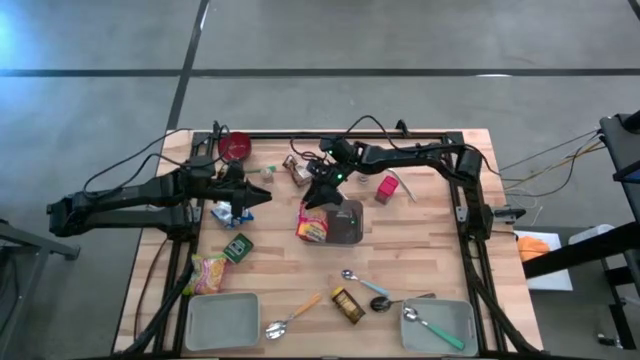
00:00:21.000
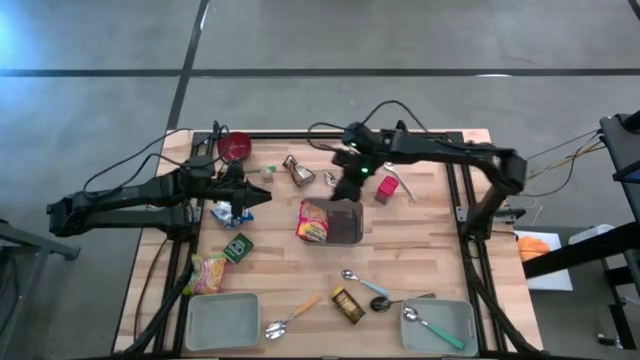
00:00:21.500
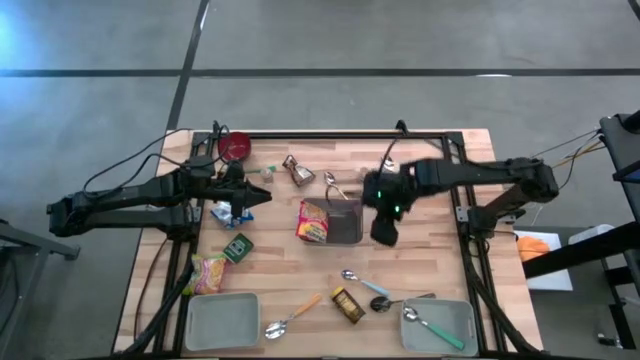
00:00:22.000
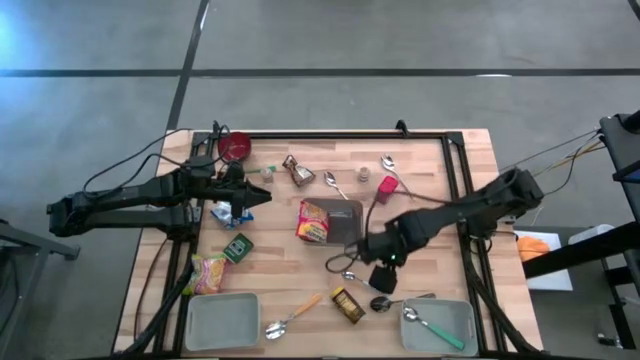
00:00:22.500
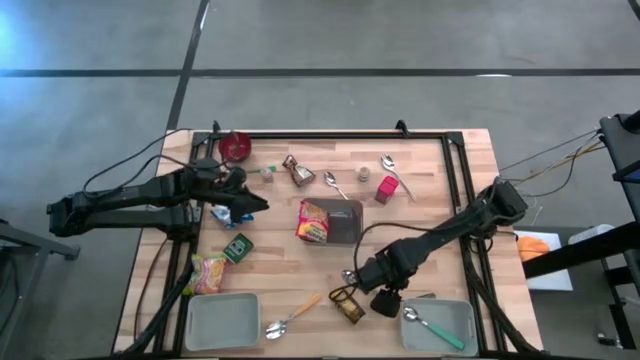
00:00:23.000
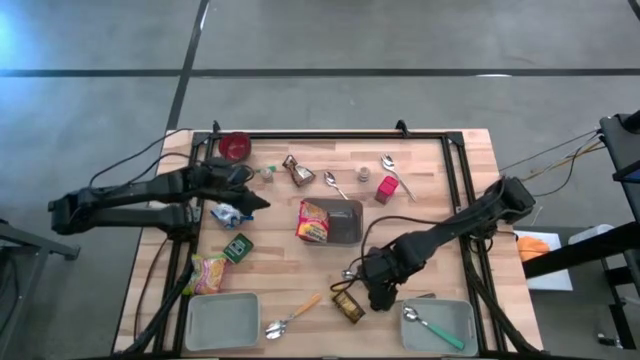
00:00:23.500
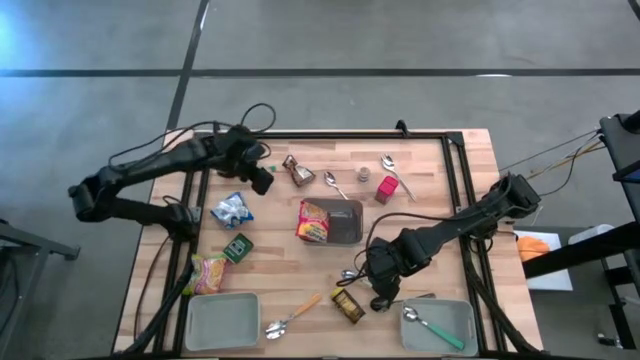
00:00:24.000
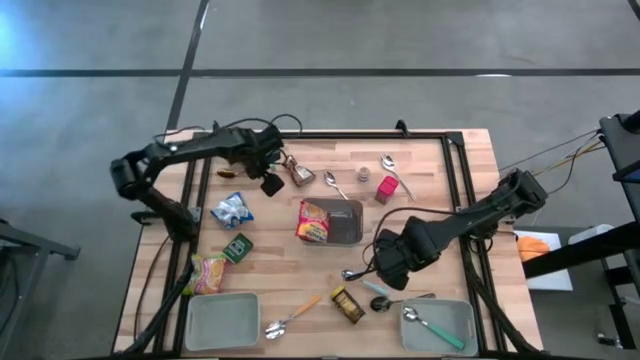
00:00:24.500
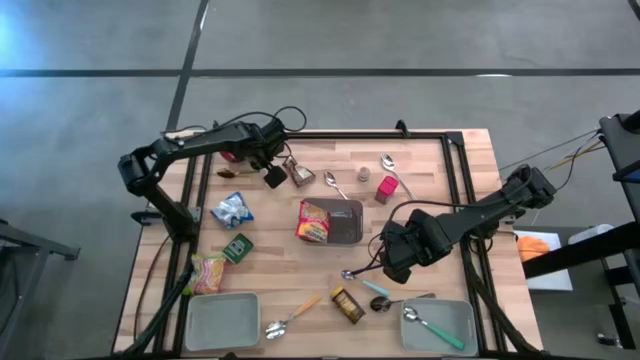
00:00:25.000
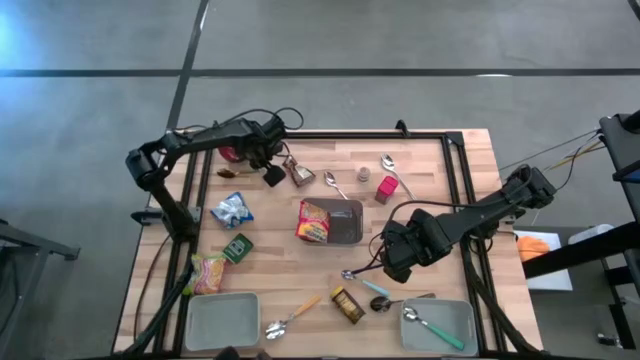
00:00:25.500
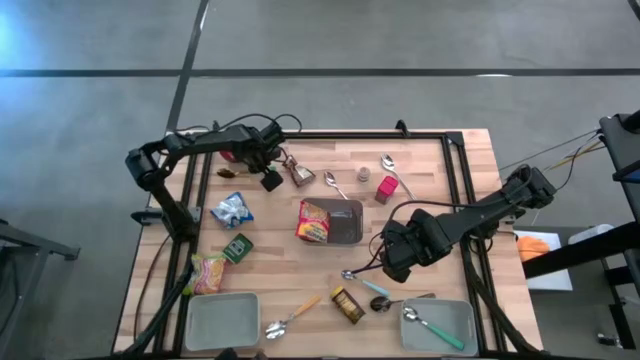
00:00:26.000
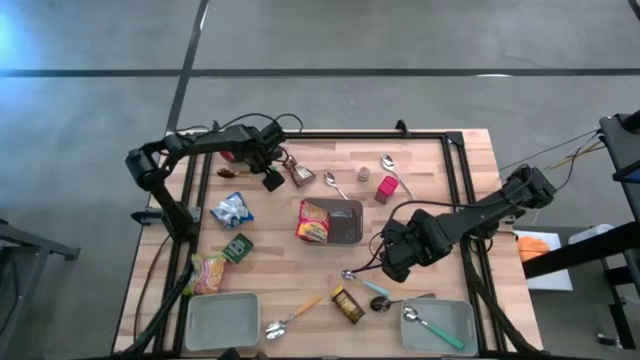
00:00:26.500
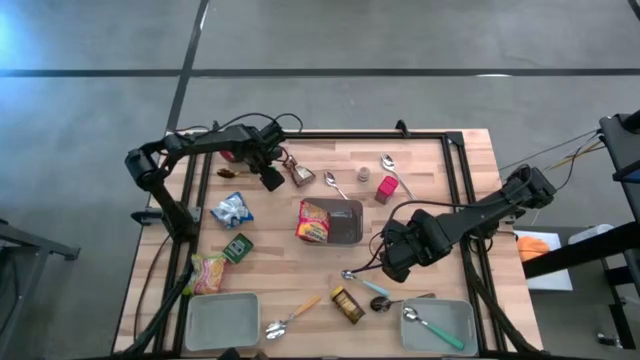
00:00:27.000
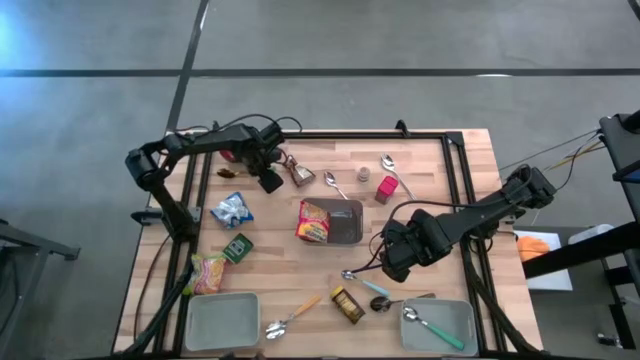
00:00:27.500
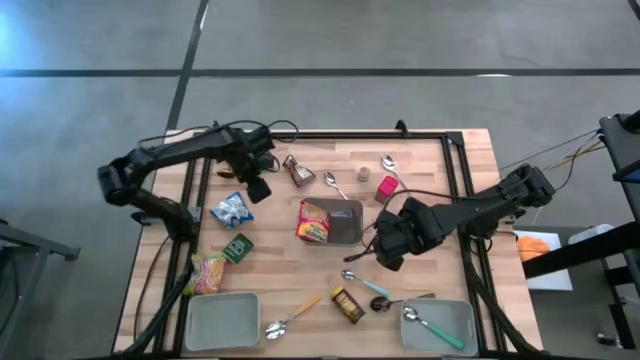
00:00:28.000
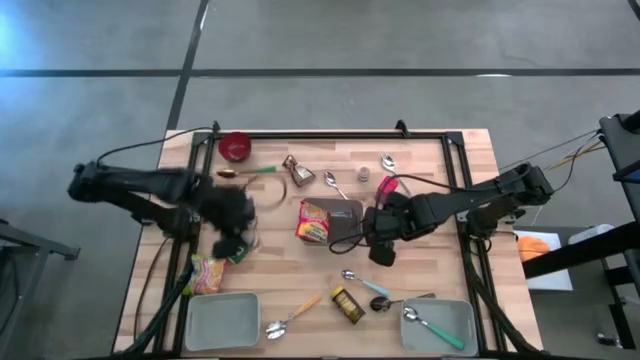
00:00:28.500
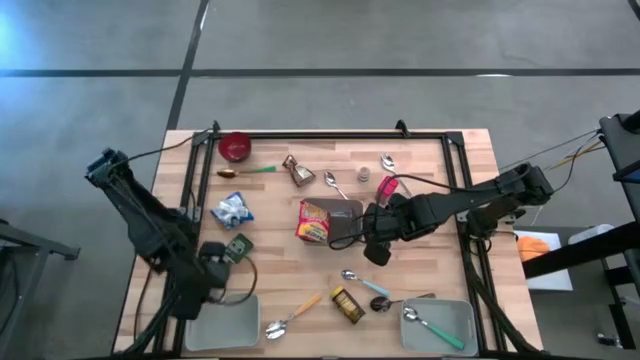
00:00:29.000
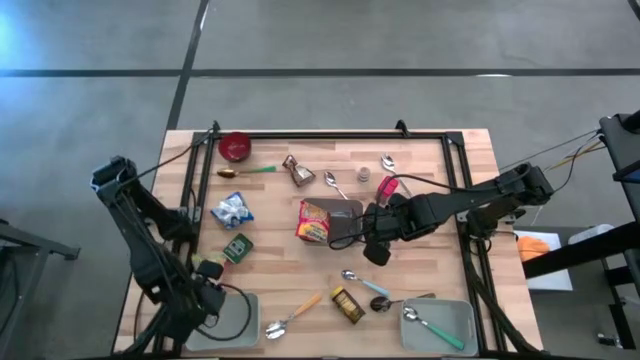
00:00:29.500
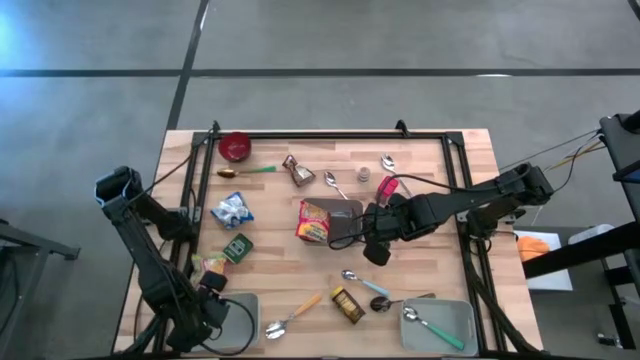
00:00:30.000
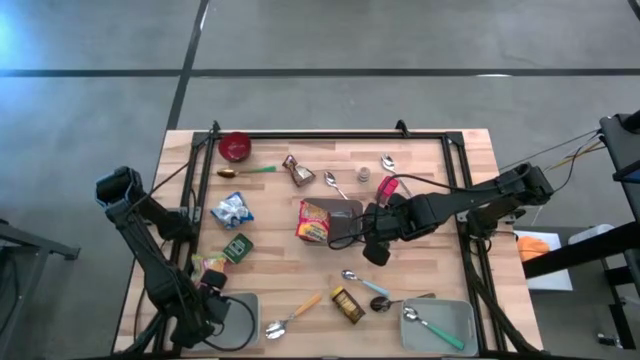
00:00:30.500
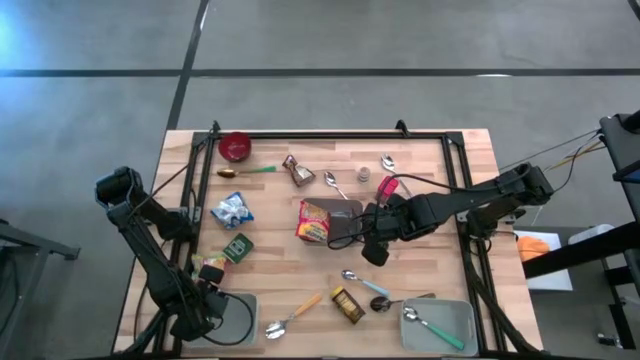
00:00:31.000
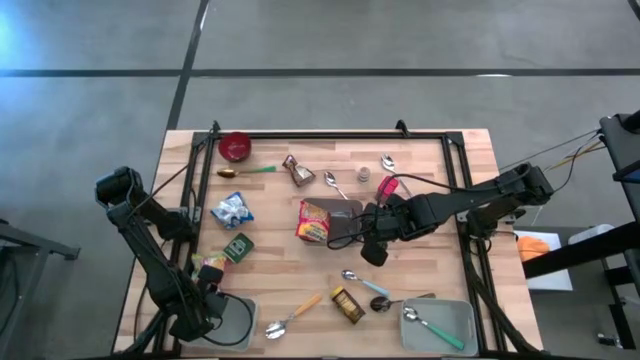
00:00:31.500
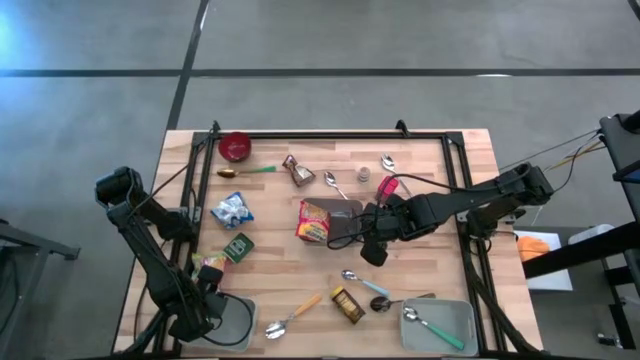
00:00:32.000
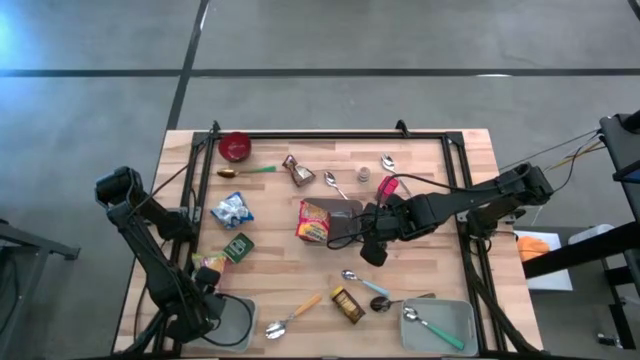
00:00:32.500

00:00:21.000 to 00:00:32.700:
Put the left brown spice bottle into the left grey bin

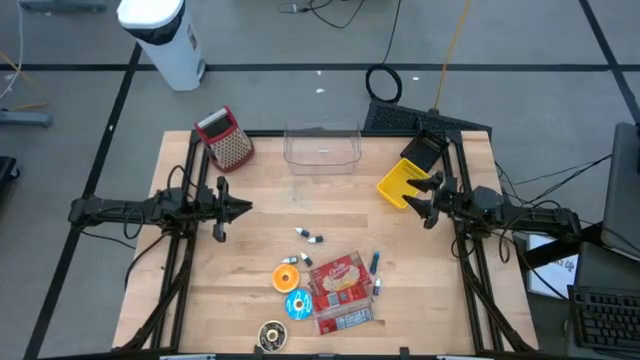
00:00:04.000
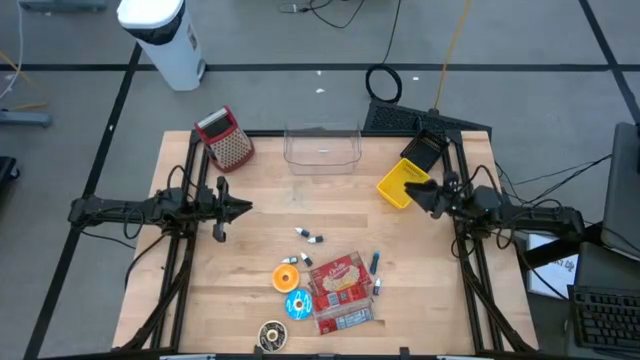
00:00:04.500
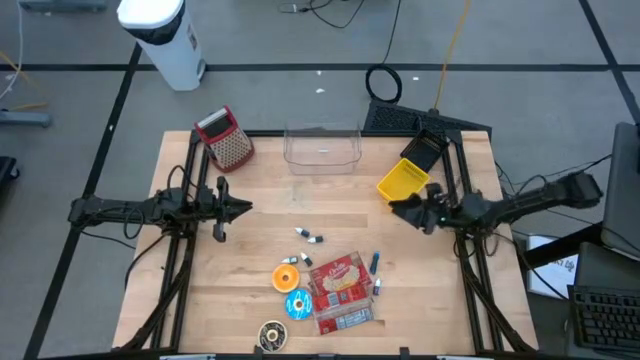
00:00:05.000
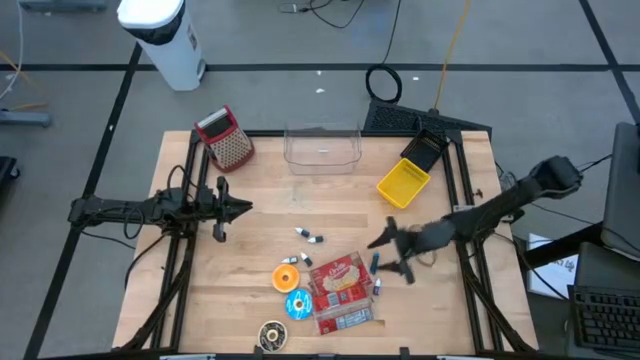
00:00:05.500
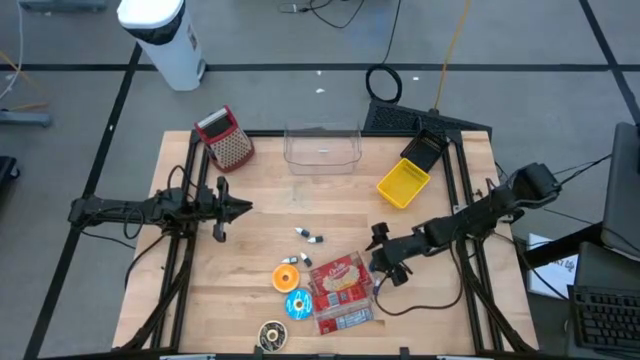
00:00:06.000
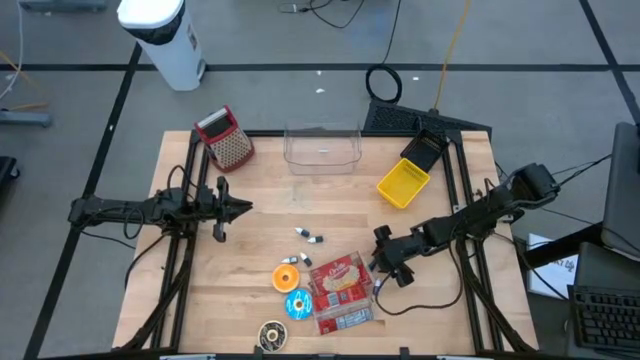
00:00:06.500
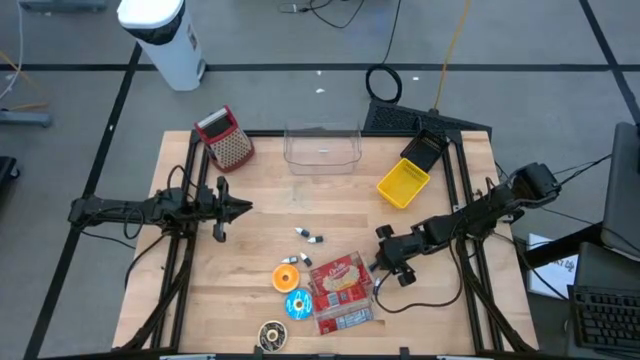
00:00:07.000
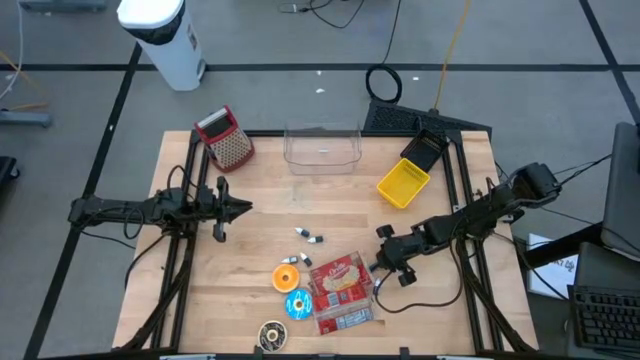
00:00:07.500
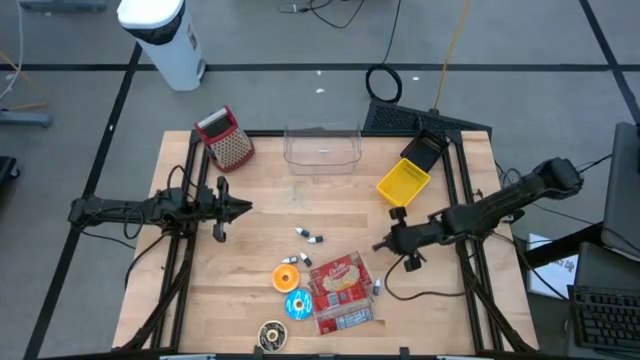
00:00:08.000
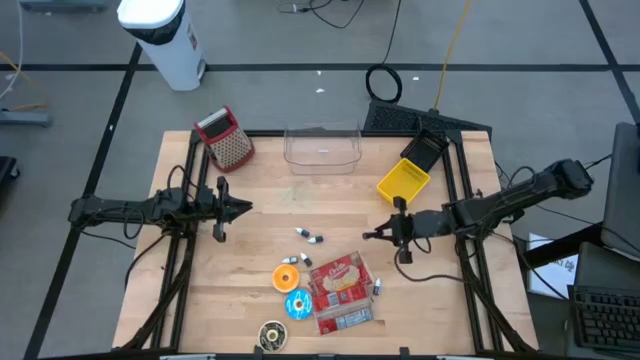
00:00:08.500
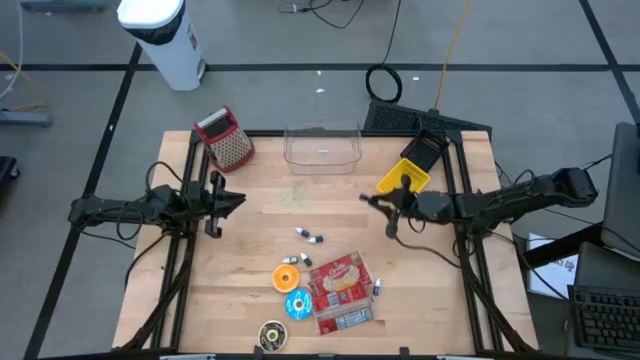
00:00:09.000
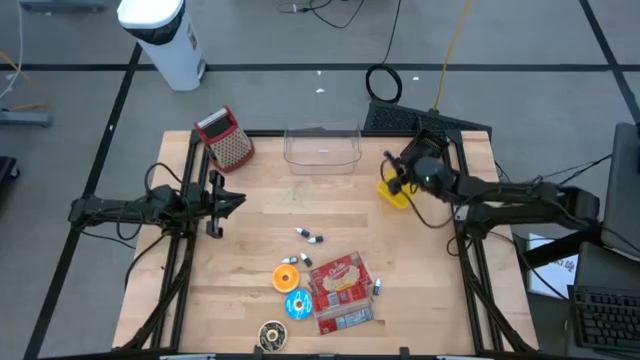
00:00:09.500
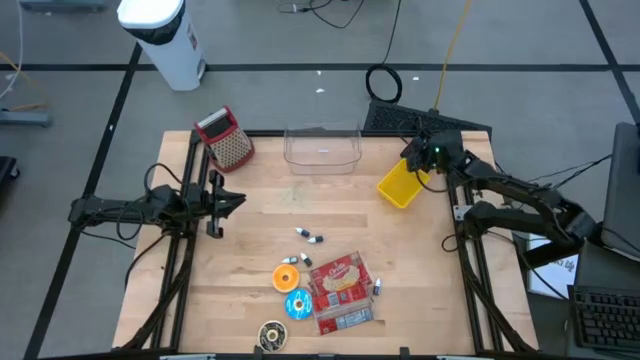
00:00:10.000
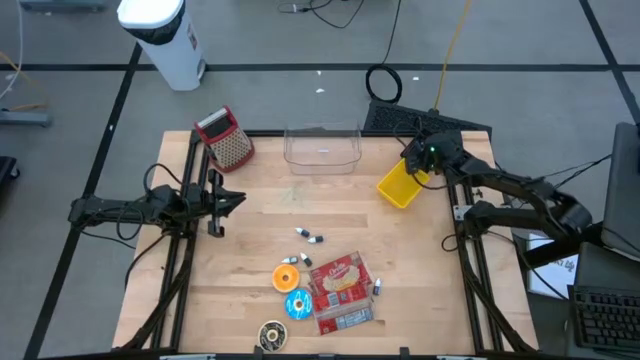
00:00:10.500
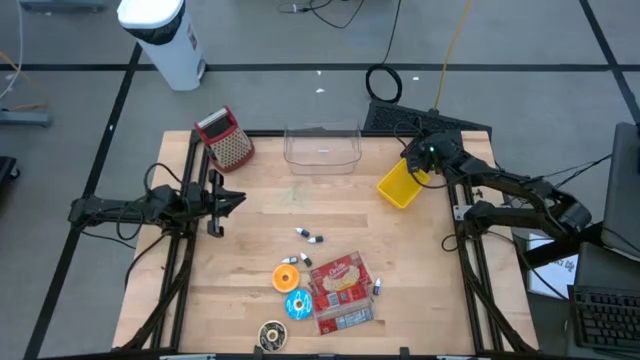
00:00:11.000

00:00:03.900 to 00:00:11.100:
Put the thin blue food coloring bottle into the black bin
